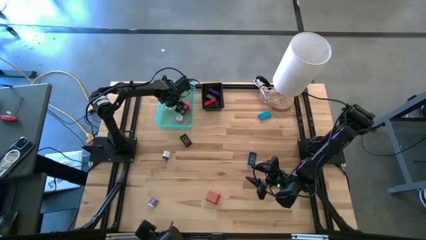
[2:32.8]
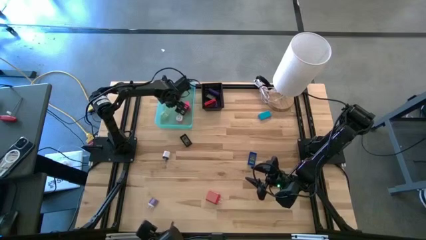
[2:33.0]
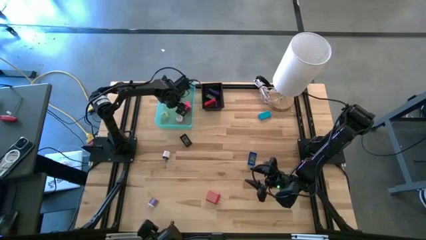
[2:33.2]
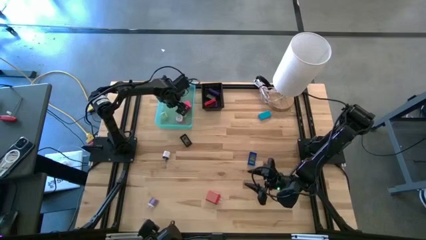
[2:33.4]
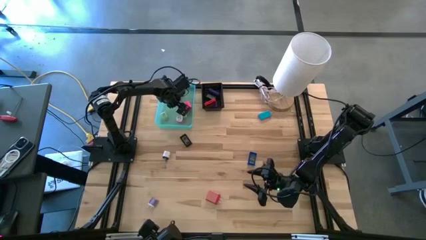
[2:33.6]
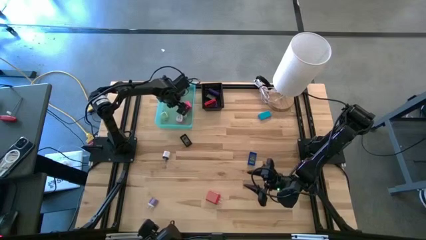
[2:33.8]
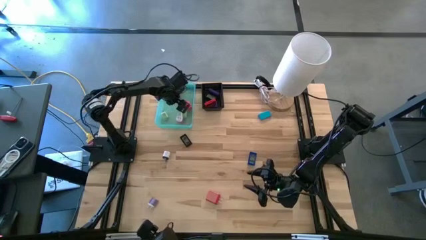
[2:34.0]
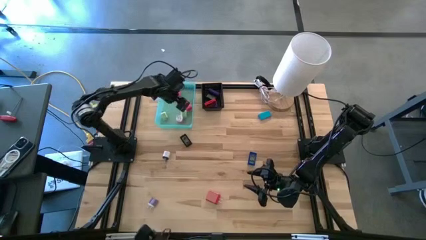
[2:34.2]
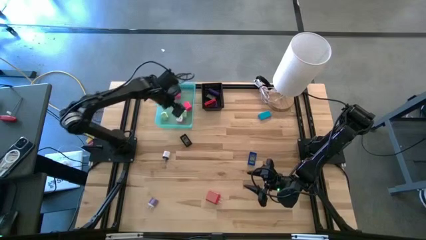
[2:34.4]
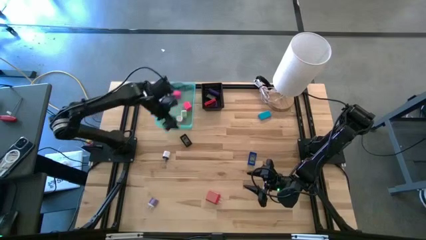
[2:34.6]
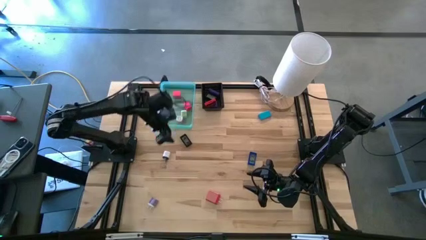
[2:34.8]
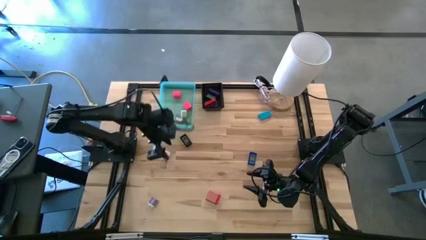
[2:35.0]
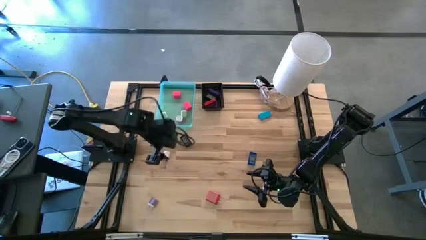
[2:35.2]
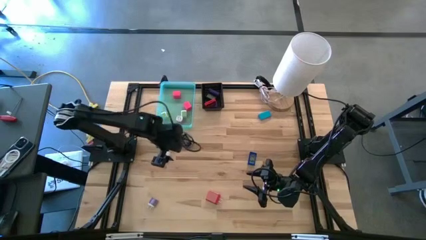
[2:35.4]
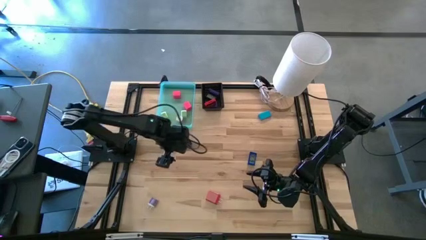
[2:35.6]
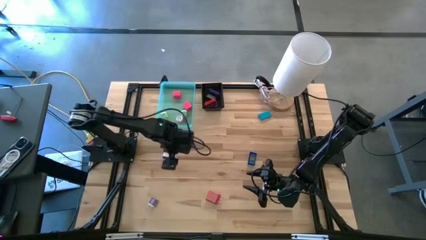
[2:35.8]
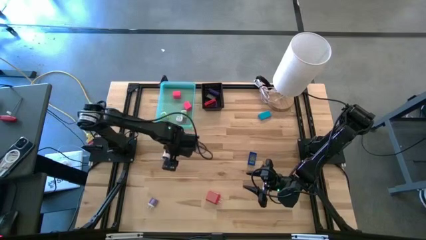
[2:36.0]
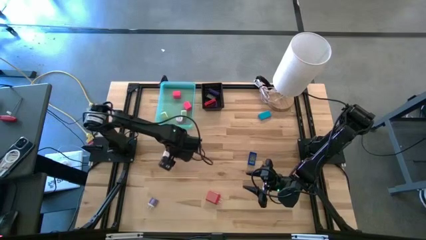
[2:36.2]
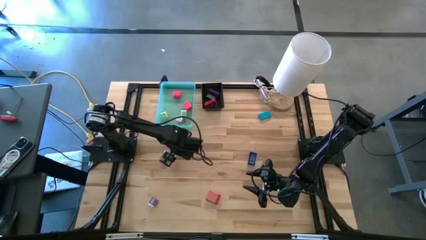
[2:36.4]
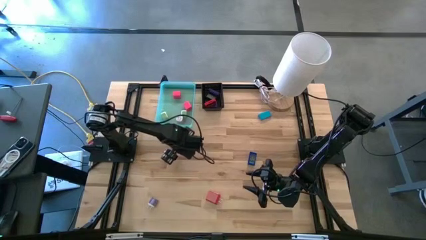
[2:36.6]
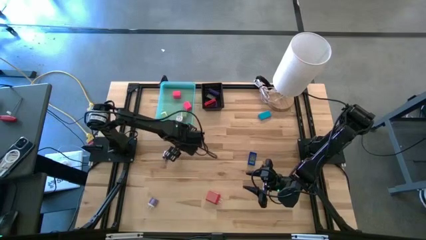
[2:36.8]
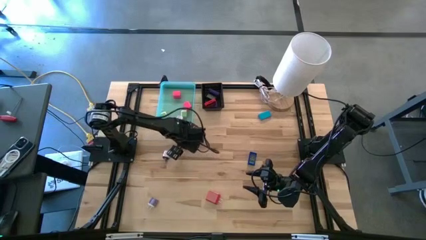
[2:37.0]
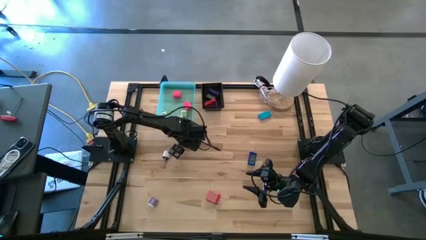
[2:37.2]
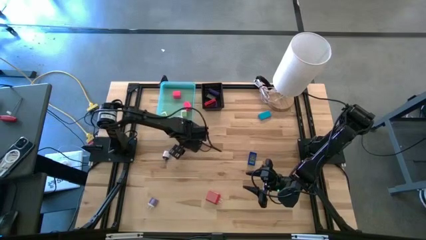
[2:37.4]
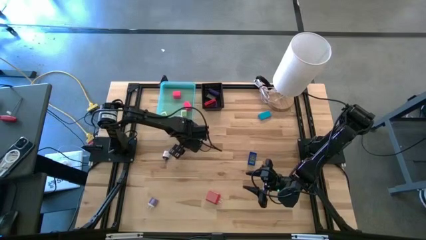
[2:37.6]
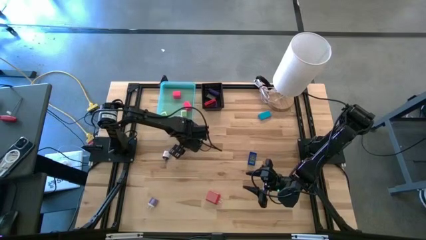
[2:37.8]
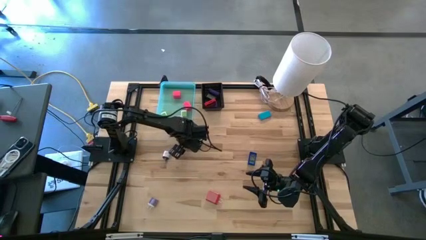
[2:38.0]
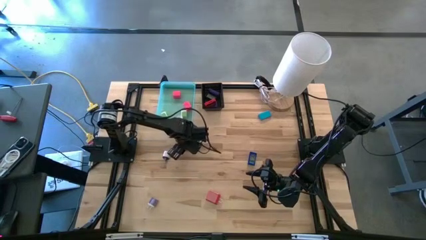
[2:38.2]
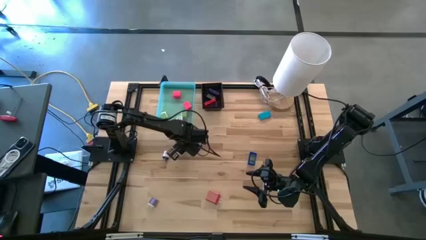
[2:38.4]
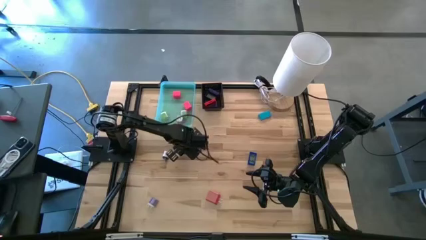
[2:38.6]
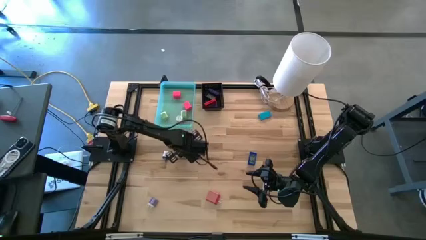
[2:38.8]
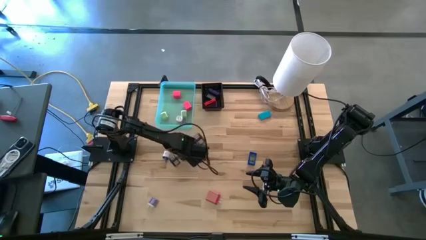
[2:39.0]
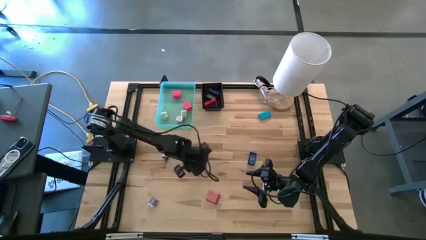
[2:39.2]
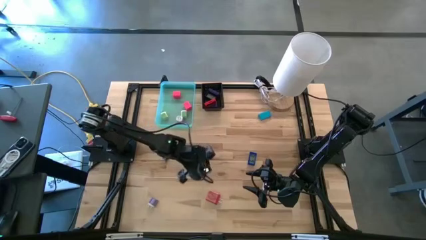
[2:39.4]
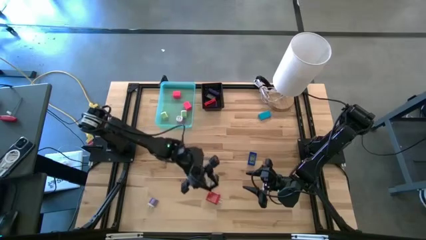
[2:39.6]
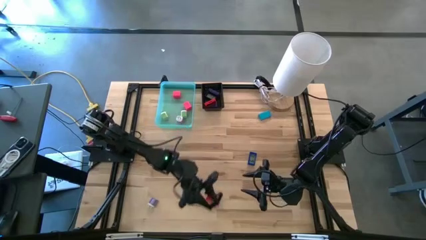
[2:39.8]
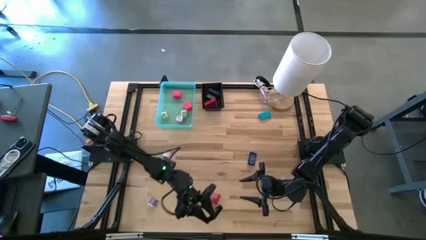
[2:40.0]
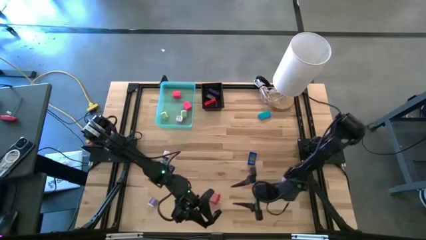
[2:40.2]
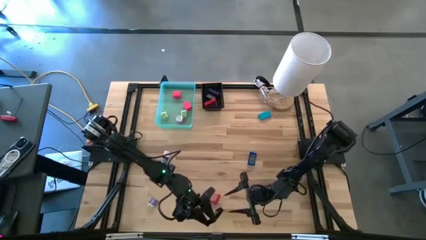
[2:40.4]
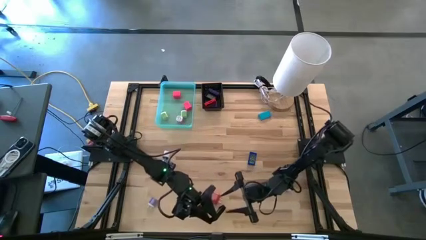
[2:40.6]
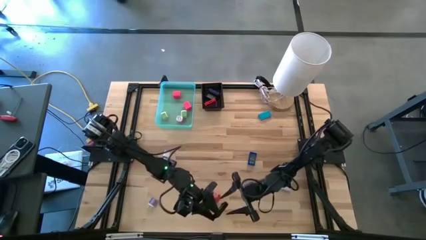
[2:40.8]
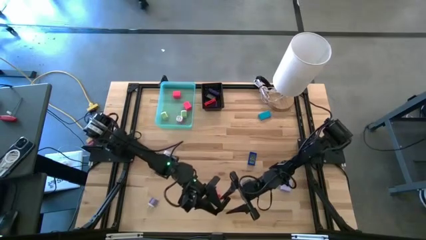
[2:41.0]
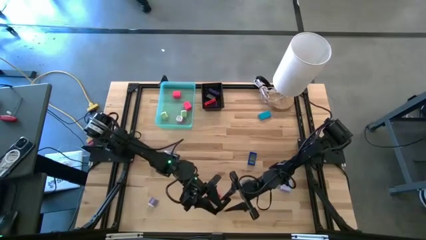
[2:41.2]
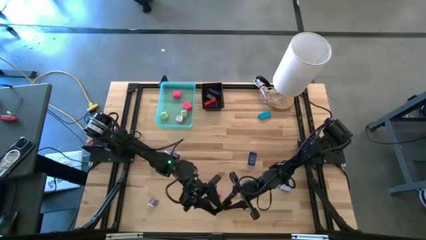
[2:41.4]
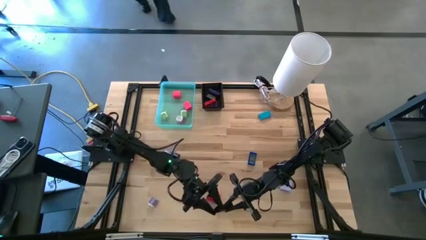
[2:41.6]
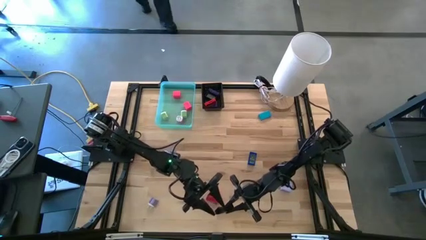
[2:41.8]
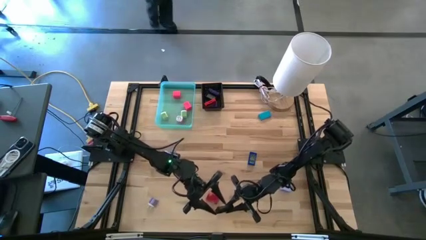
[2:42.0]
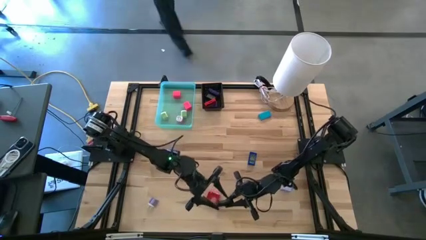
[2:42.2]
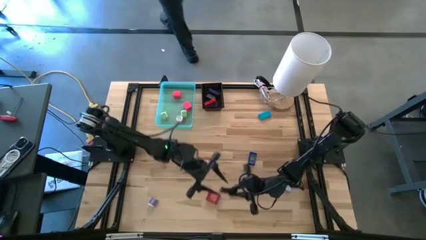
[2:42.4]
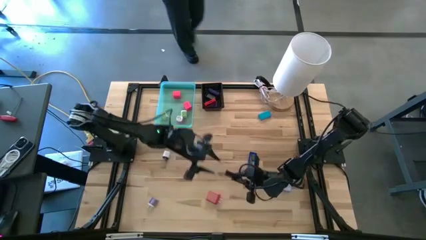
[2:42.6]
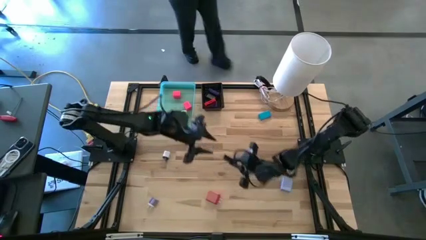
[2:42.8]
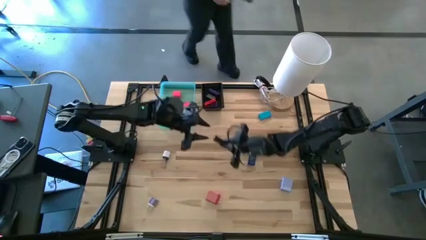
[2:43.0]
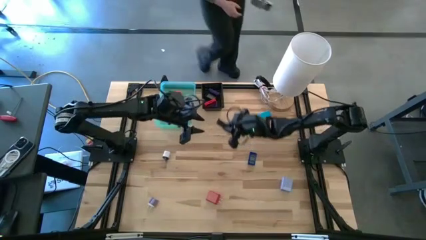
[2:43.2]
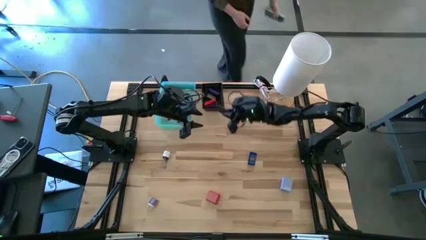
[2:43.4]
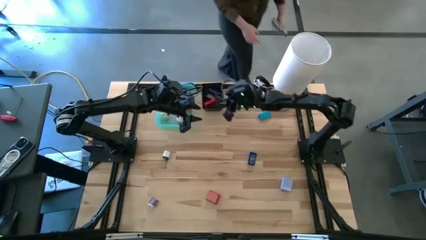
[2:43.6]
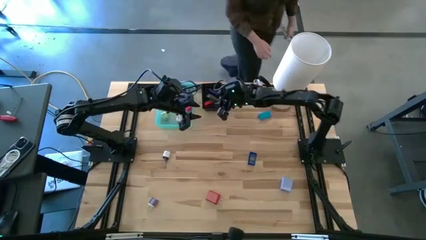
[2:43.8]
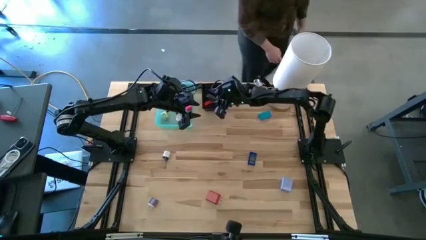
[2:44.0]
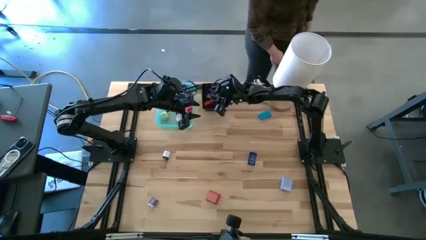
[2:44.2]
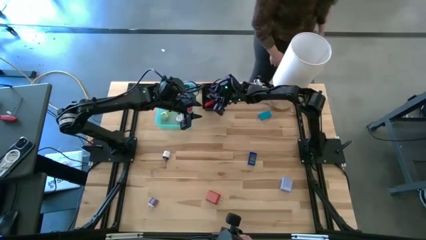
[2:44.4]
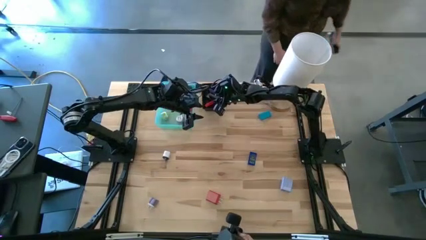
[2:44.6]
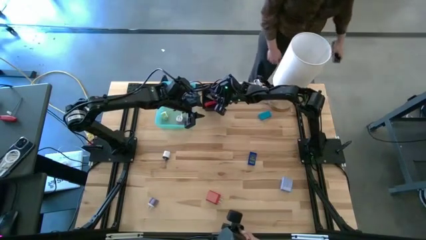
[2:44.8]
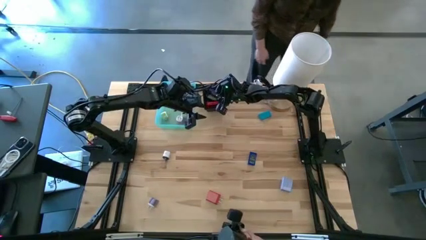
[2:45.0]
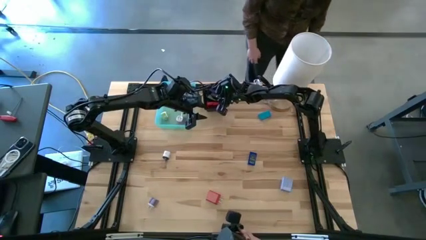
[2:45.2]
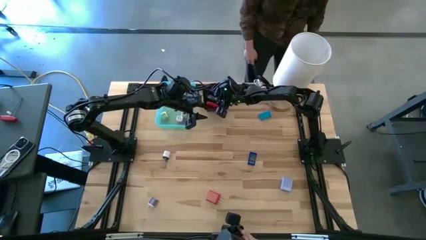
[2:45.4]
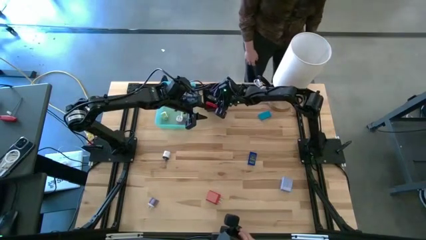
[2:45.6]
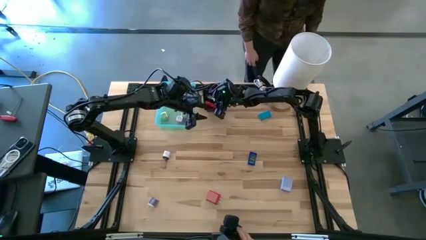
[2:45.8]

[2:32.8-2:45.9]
Task: Pick & Place Office items
Put the black timer into the black bin

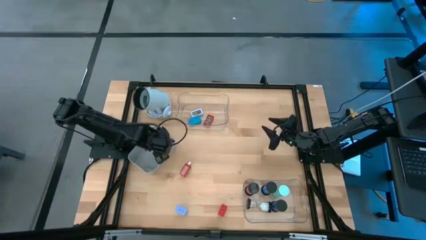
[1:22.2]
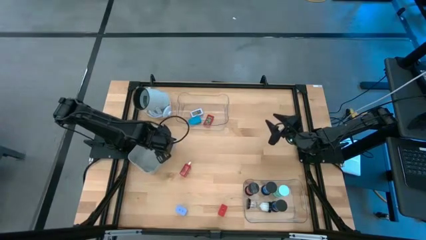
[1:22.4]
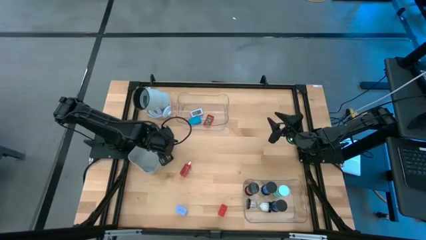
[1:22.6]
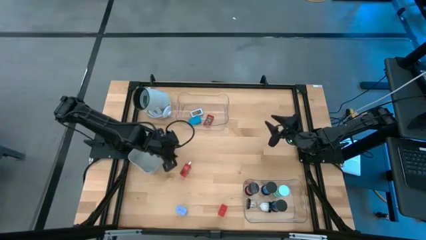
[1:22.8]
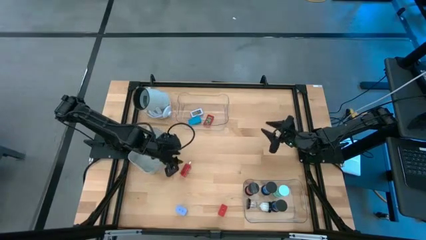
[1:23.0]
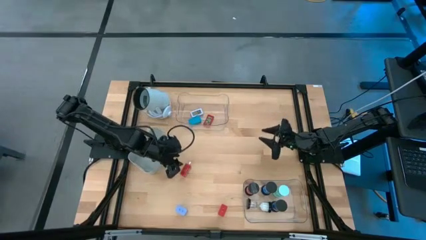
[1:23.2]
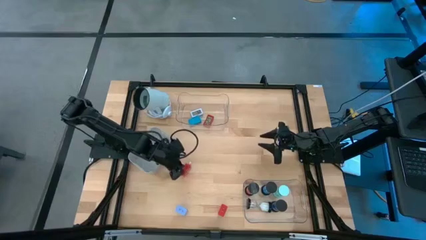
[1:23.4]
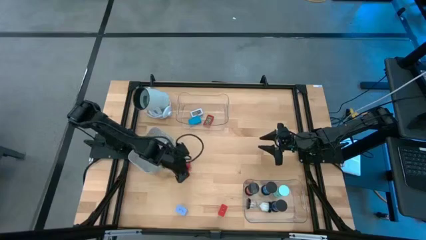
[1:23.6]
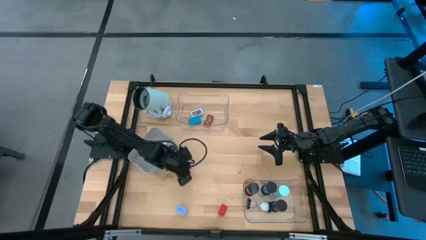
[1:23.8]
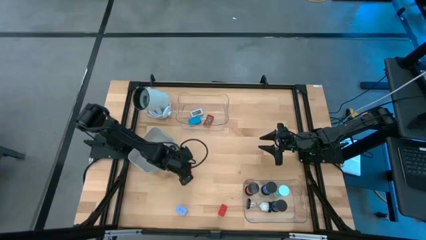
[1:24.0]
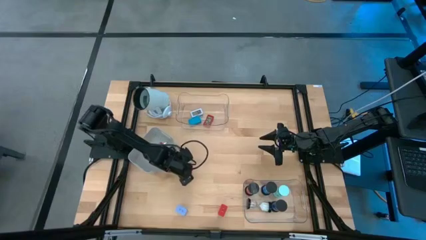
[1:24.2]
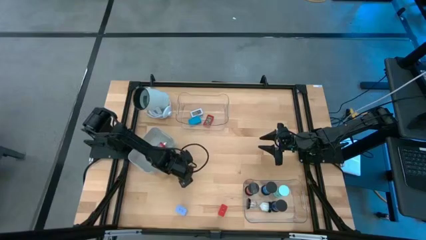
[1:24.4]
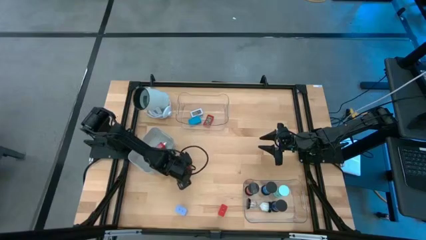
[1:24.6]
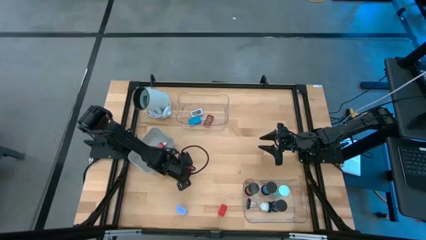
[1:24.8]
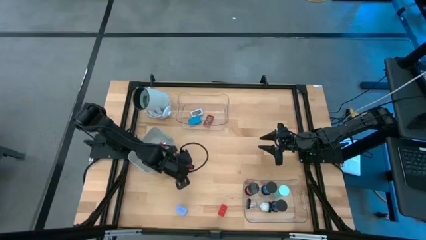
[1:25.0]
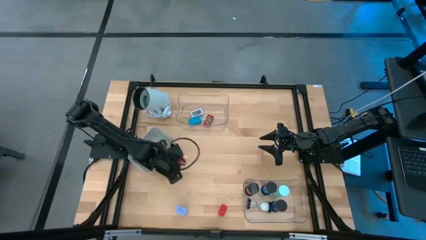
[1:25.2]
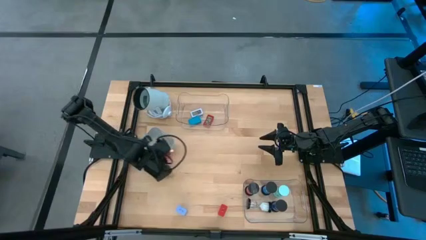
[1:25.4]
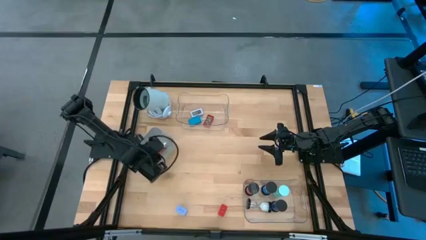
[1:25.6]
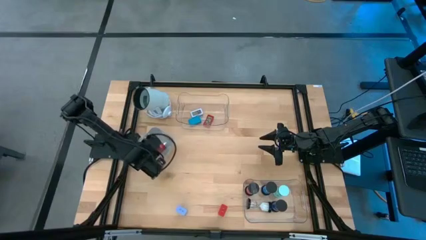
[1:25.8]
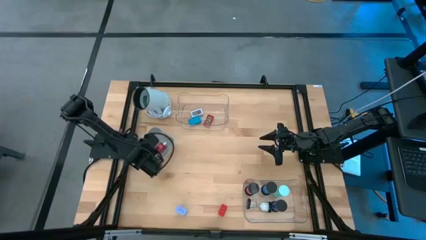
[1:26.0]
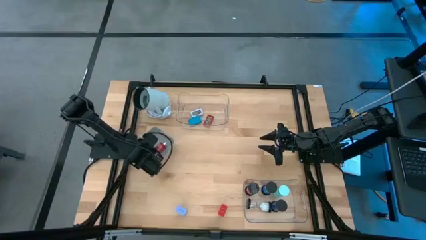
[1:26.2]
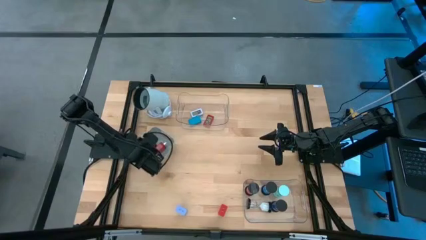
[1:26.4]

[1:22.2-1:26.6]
Task: Pick & Place Office items
Put the top orange charger adapter into the gray bin
